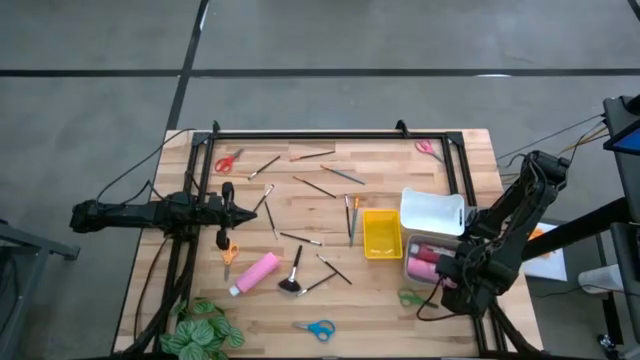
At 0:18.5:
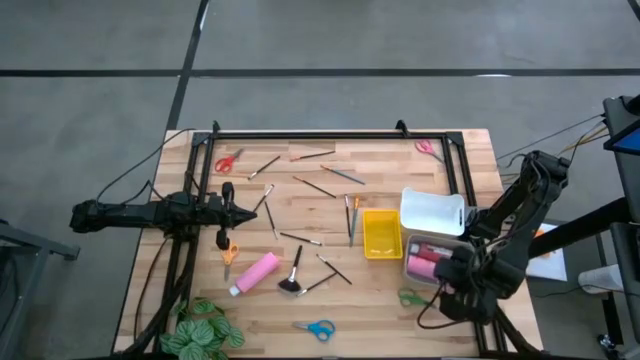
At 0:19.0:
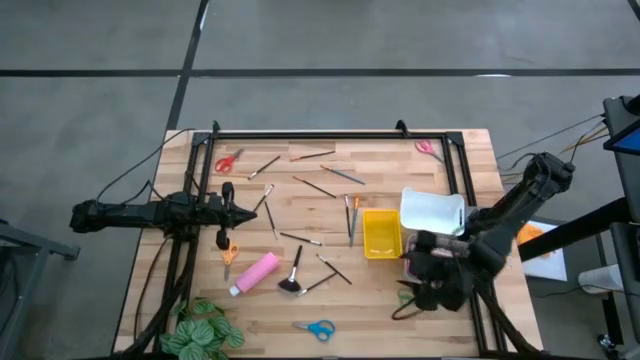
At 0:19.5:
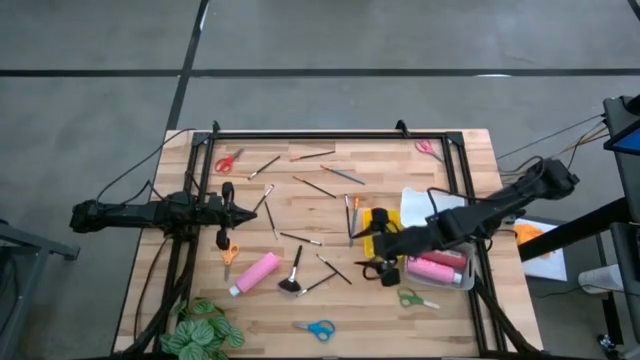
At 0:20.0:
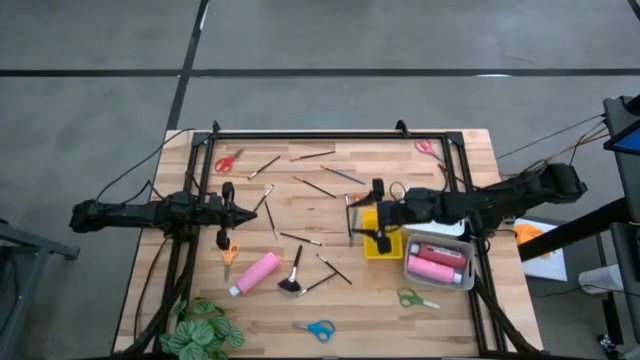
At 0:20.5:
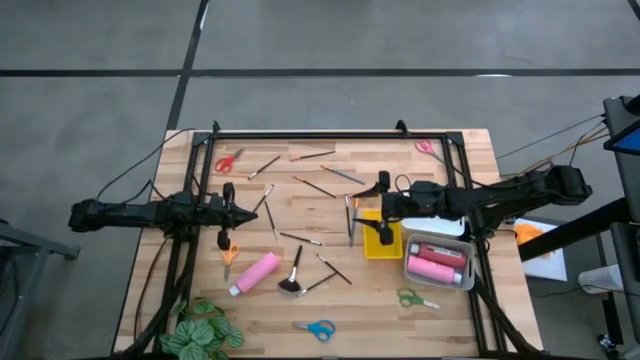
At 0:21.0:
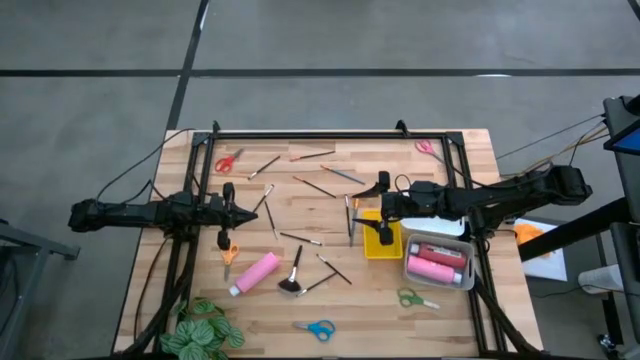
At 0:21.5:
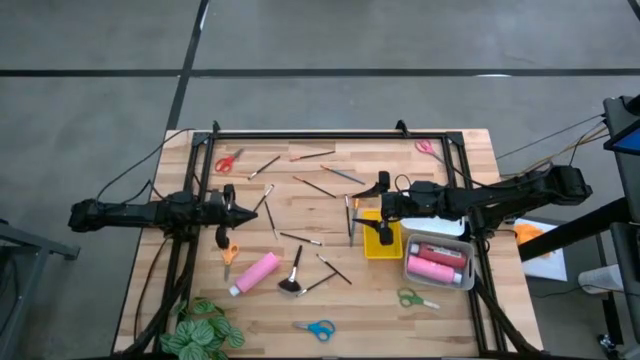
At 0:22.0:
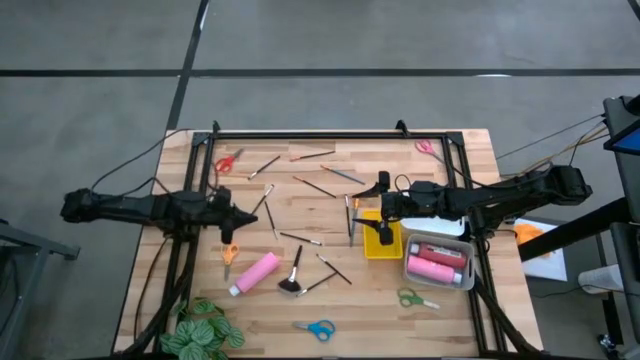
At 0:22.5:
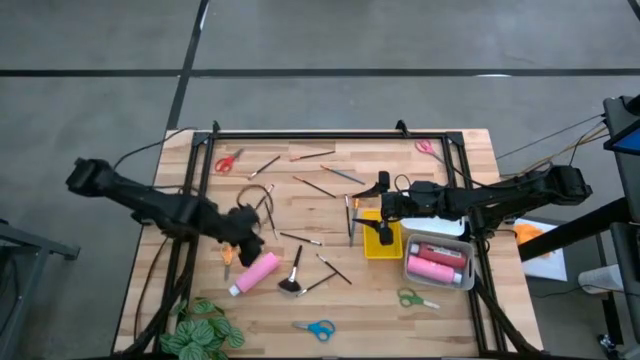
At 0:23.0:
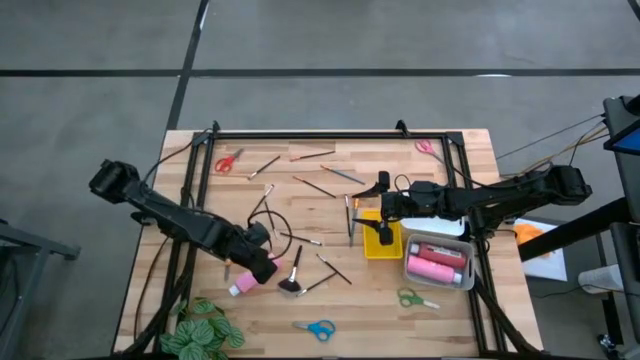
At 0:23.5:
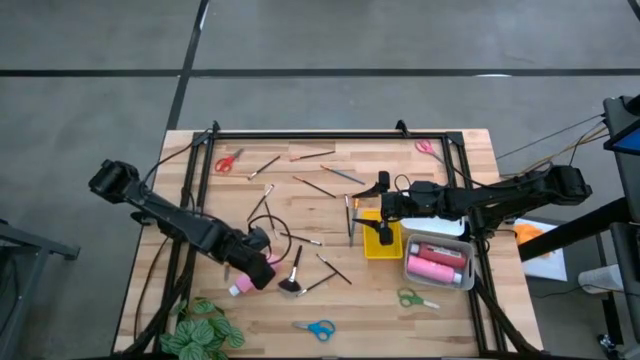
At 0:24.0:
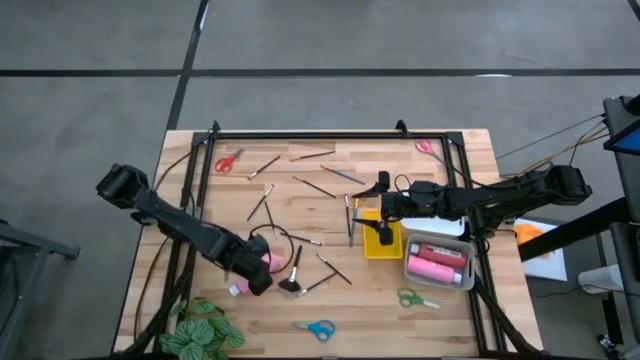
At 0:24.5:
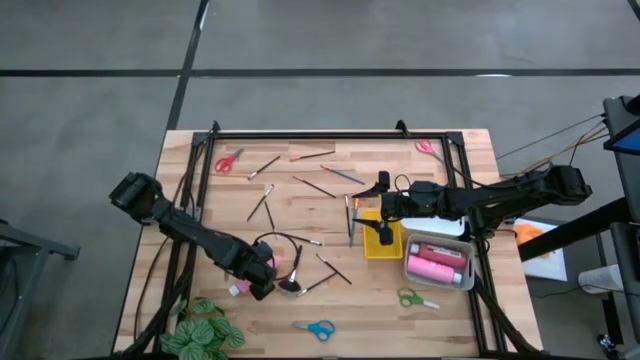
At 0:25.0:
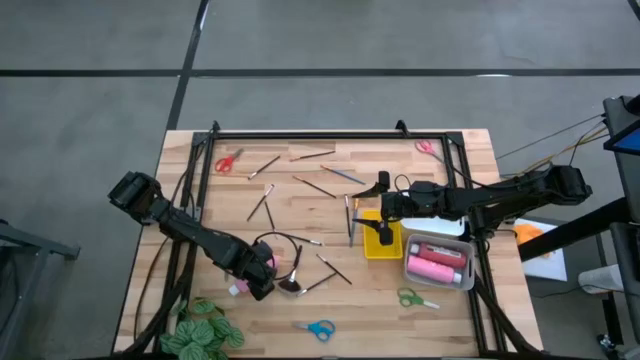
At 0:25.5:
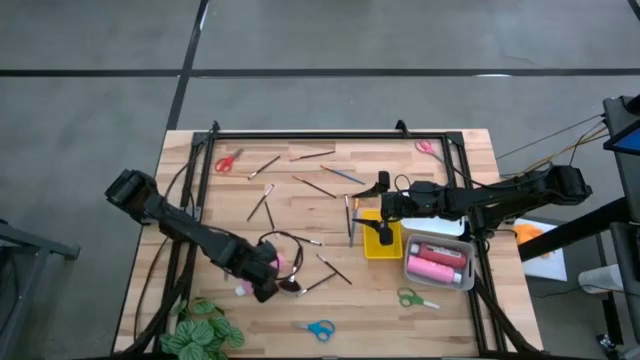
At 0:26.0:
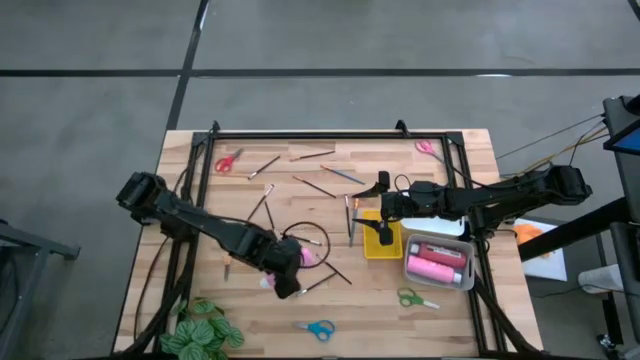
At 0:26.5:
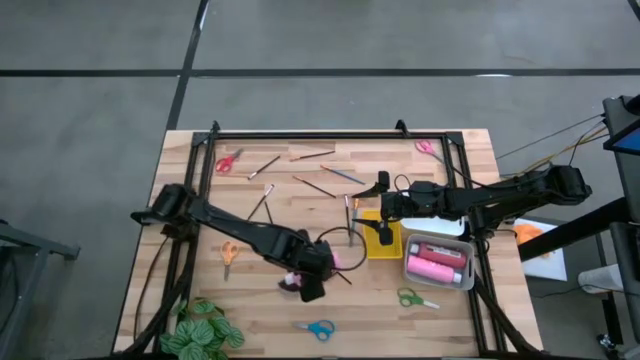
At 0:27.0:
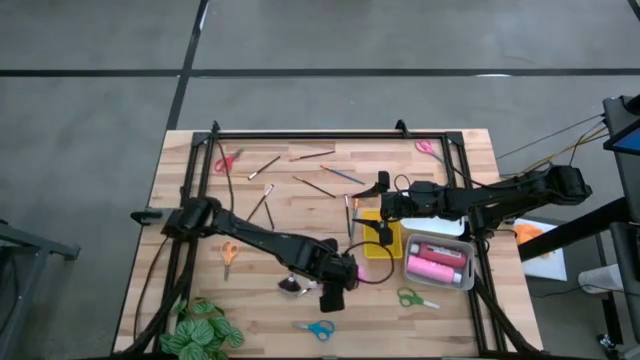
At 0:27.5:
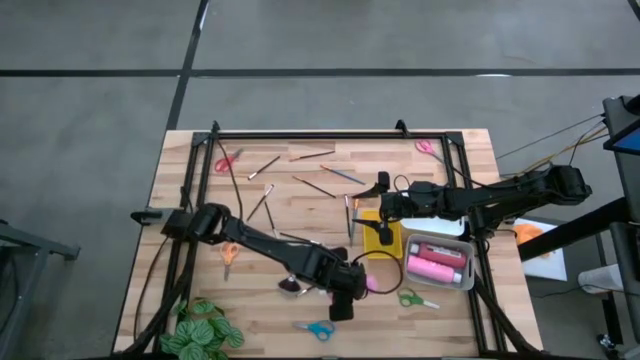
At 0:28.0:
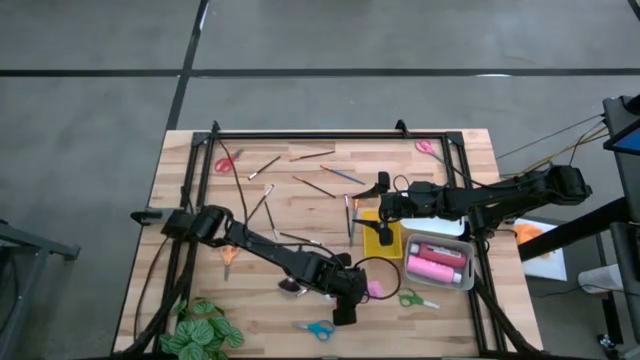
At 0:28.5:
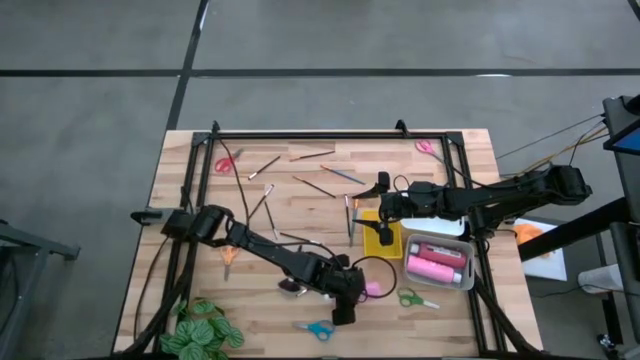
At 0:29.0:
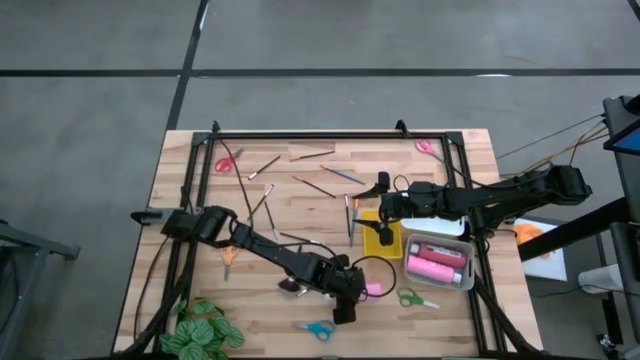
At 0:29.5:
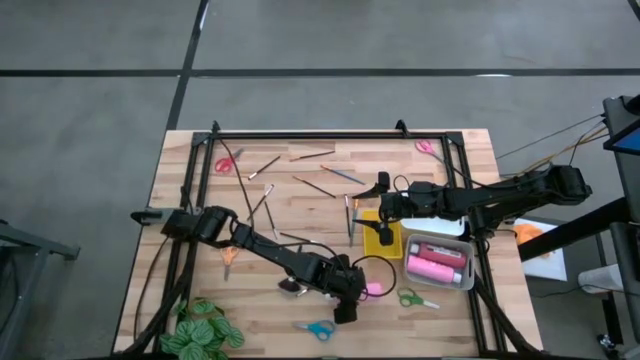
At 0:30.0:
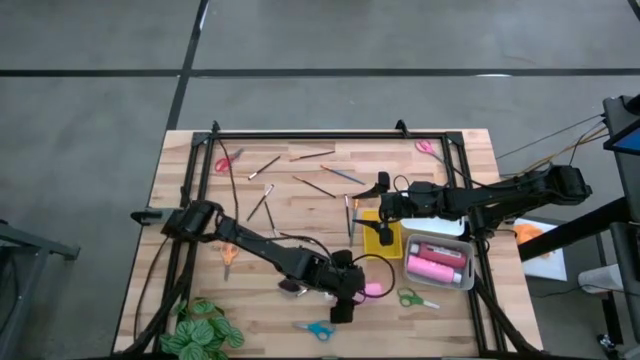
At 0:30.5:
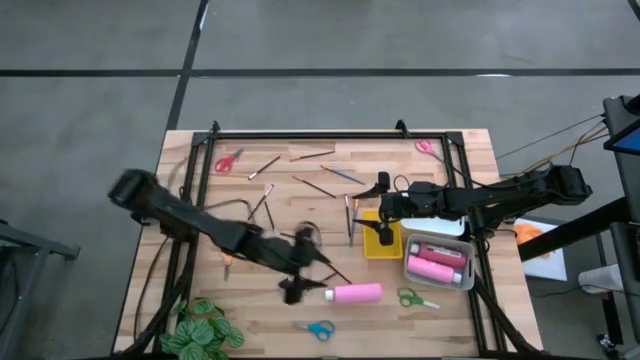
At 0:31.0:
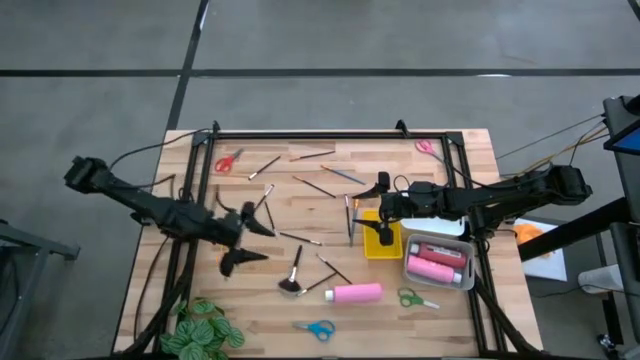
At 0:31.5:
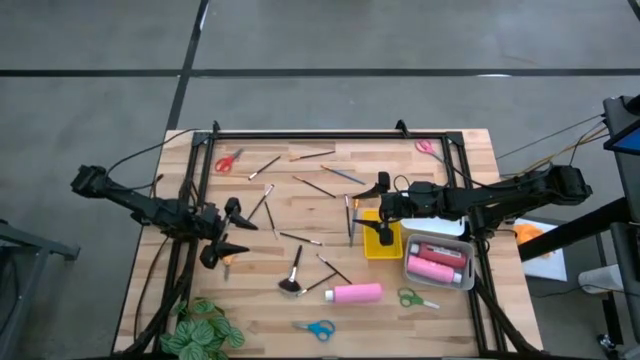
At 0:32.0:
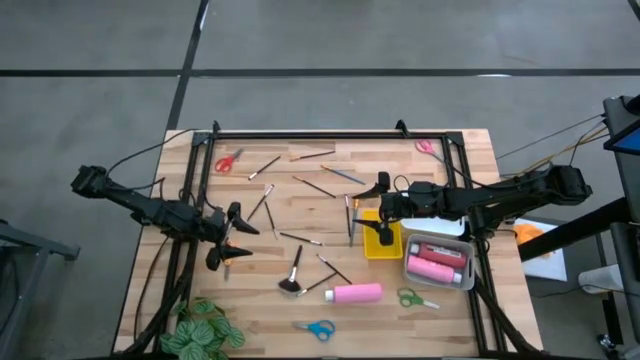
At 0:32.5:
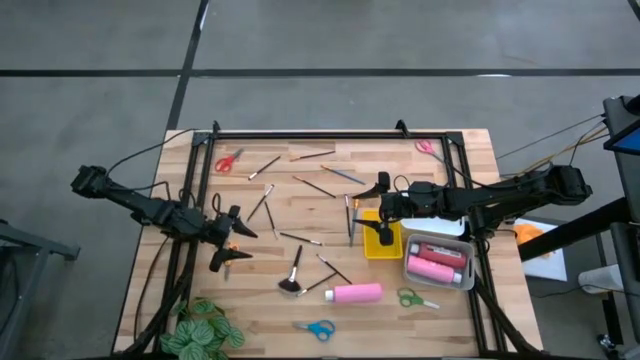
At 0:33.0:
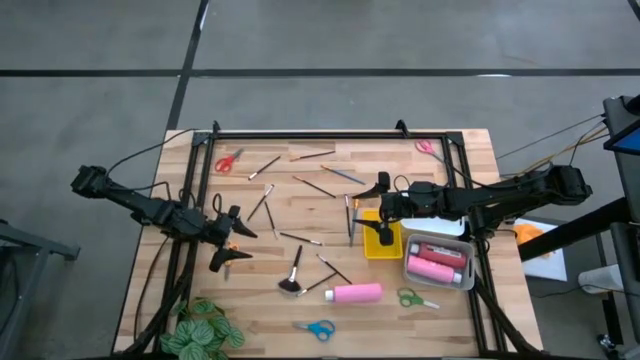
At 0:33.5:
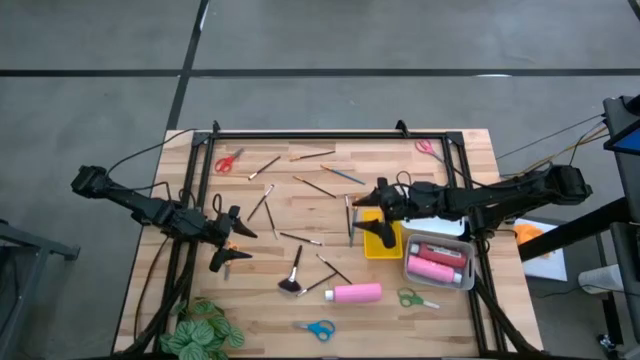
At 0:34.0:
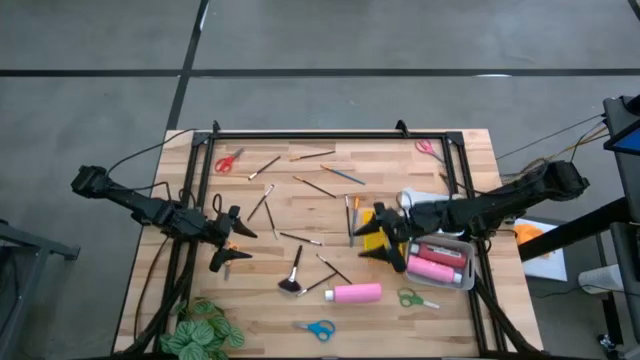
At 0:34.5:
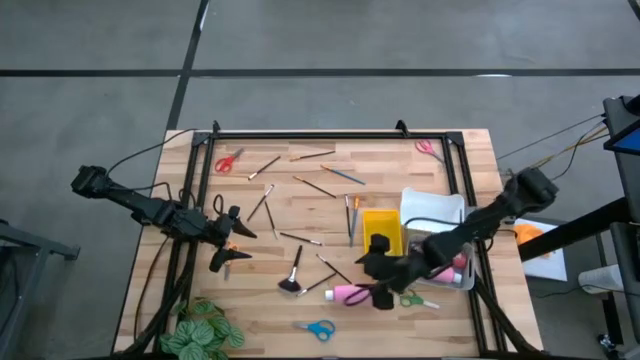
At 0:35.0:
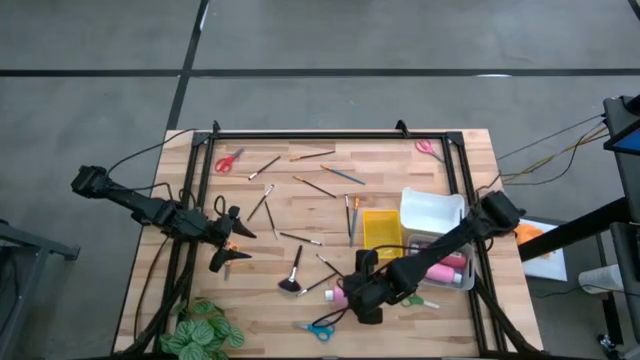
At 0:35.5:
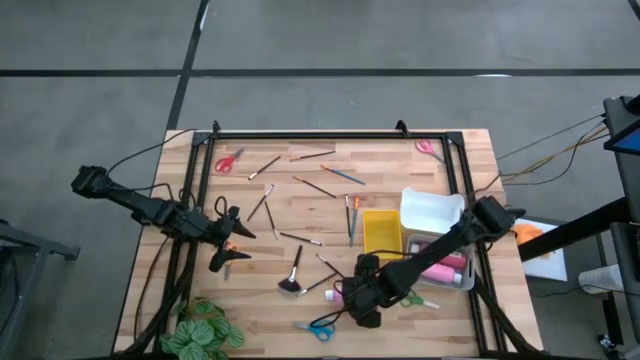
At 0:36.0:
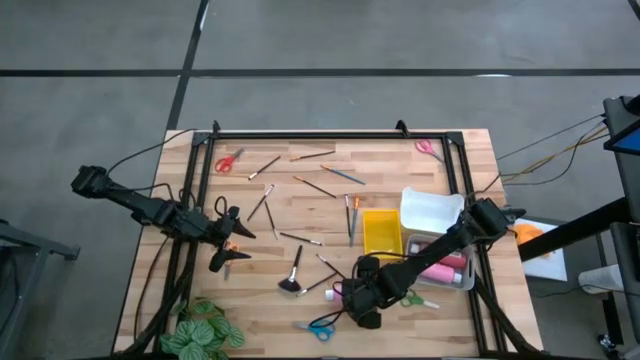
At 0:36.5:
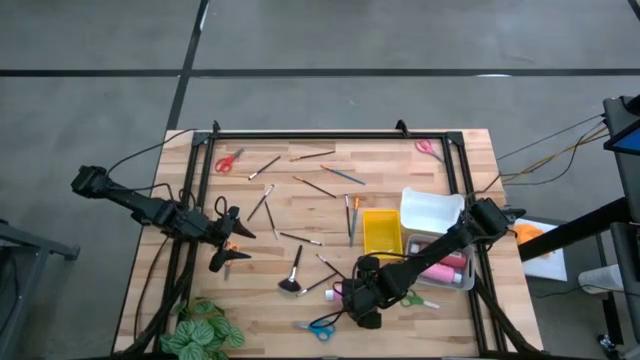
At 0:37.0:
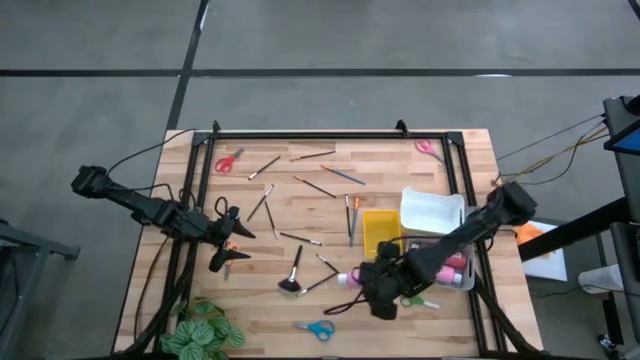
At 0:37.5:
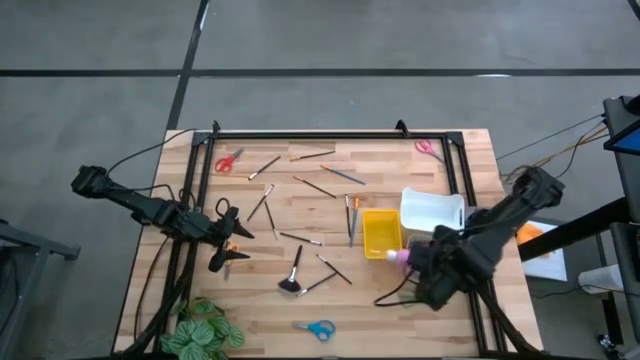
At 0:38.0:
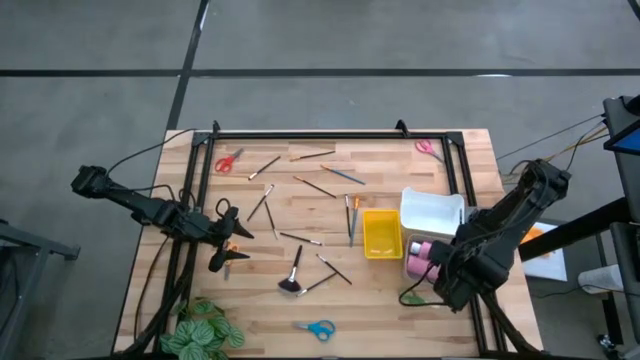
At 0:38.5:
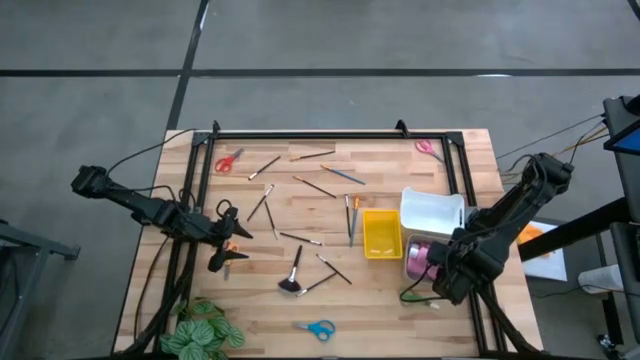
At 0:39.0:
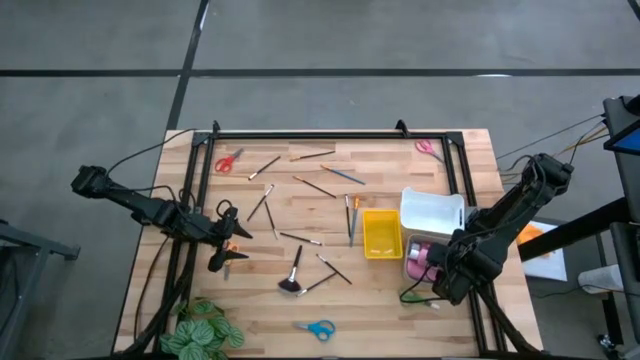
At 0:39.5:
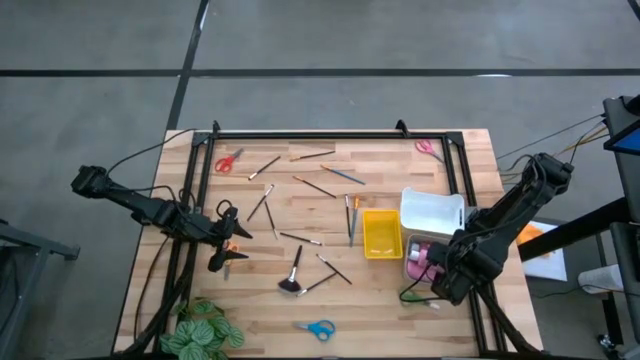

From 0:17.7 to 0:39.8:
Task: Pick & Place Paint Supplies
Put the pink paint bottle into the gray bin
